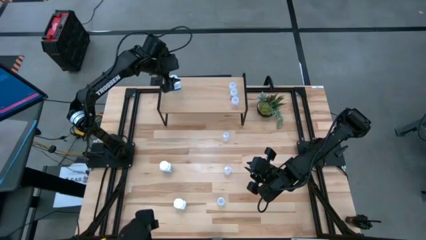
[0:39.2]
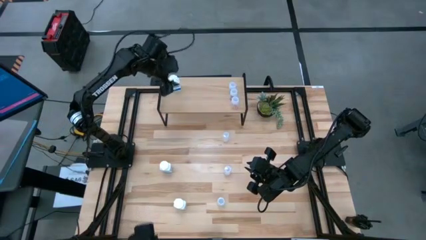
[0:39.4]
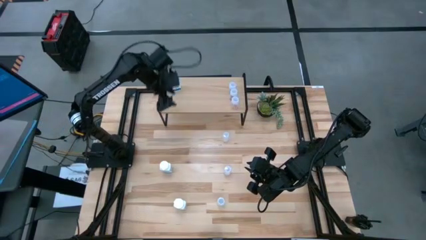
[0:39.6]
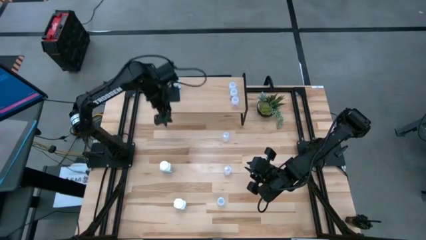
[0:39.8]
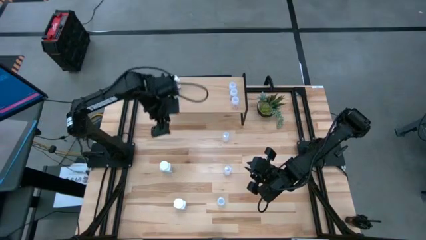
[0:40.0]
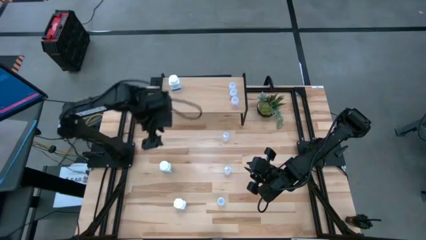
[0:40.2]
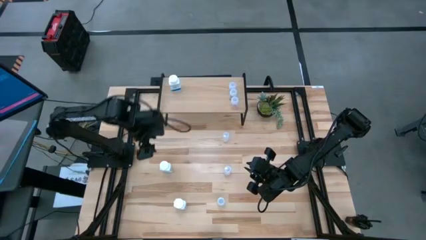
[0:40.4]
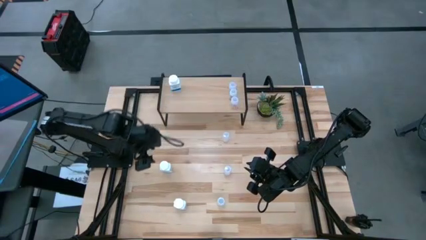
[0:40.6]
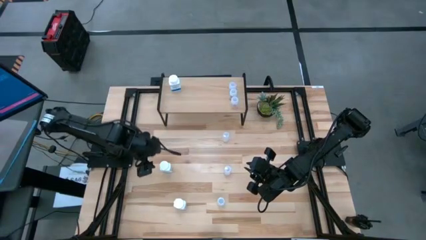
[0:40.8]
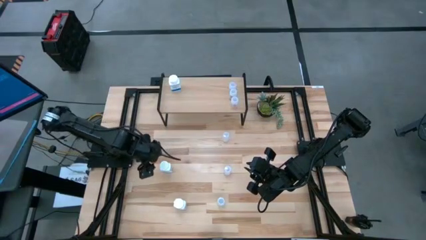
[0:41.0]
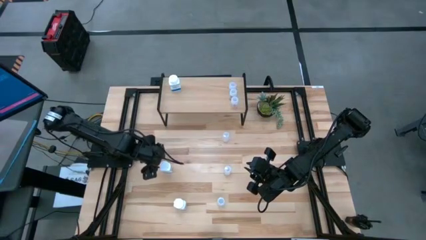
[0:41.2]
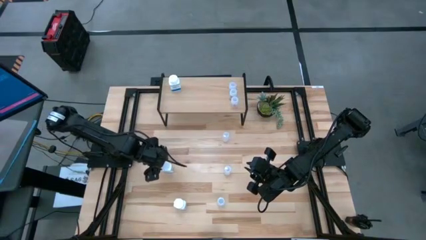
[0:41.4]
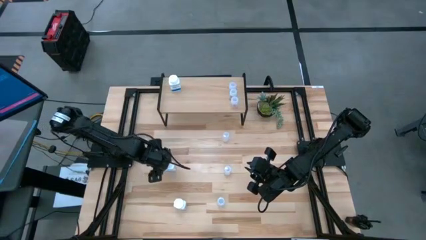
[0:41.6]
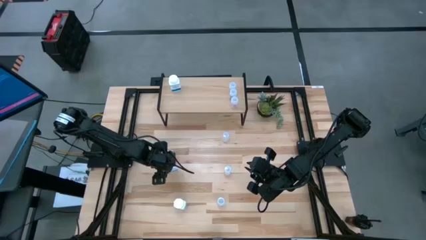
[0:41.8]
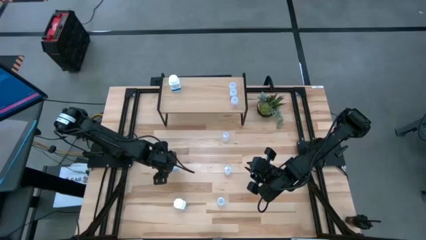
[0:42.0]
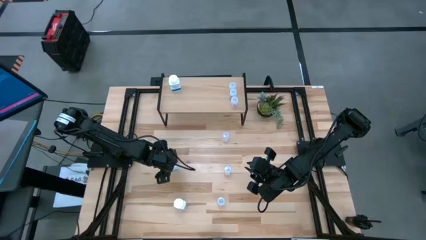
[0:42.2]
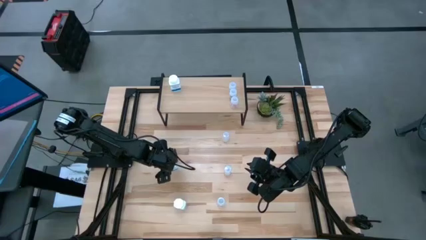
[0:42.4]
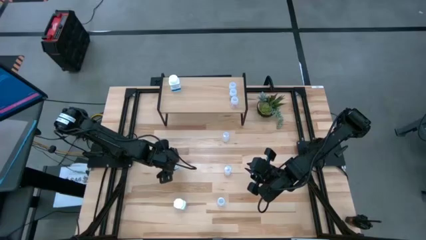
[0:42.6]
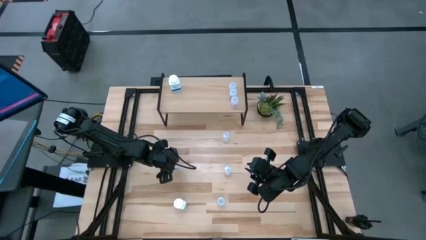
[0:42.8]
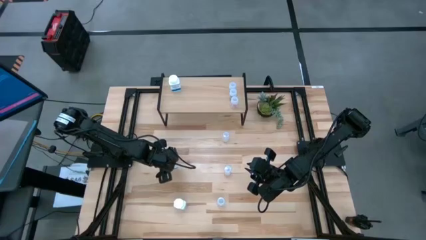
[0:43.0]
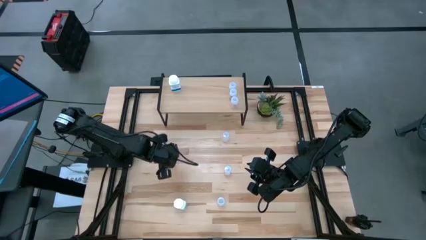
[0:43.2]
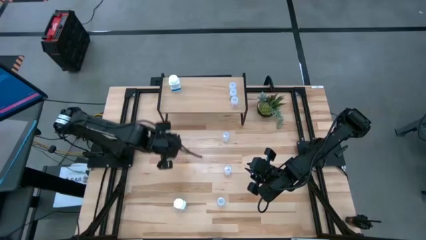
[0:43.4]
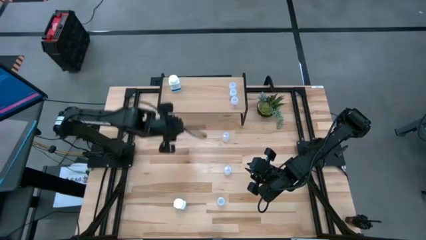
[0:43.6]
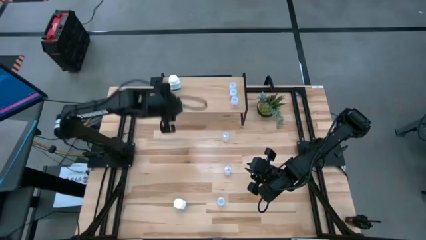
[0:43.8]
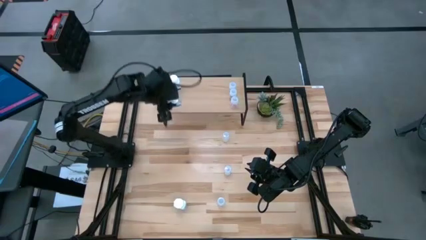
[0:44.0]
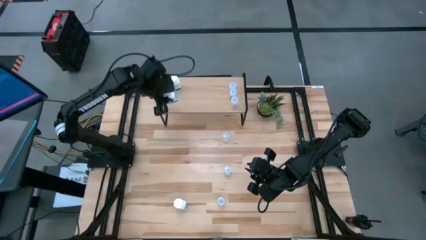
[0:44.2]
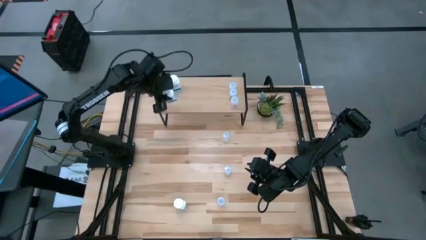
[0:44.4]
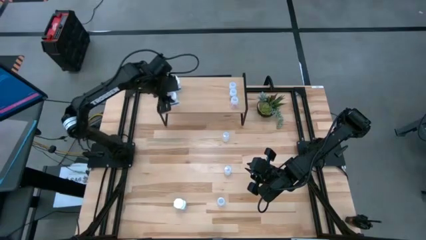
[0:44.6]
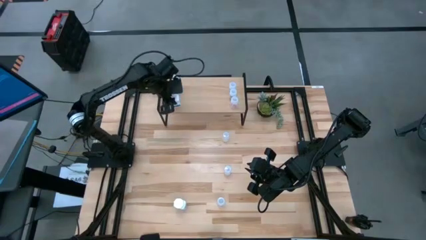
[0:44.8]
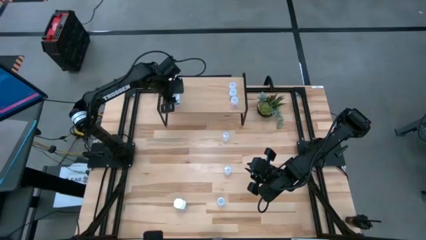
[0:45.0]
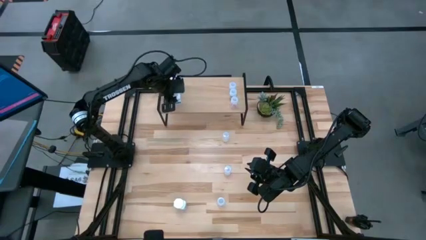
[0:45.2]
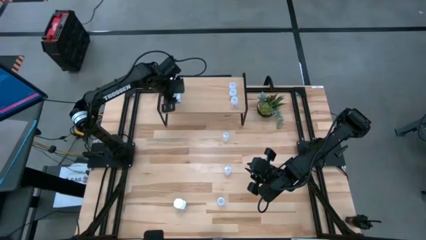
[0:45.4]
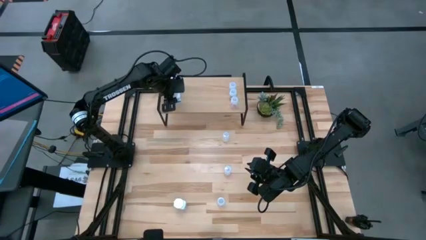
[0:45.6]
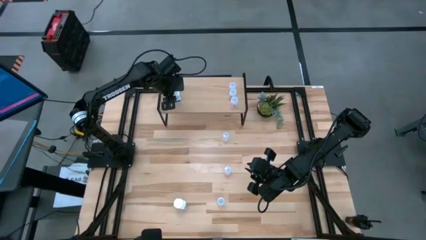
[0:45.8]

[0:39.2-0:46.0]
Task: Pick and place medicine bottles onto shelf by color
Put the white pill bottle on the shelf aligned with the other white pill bottle

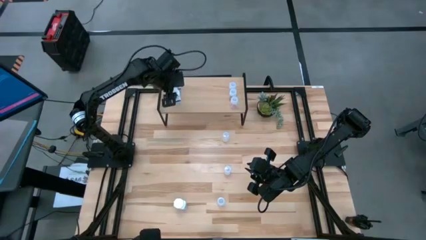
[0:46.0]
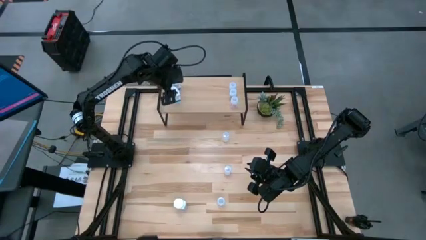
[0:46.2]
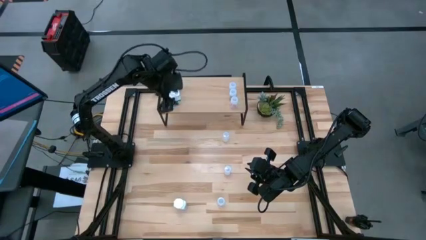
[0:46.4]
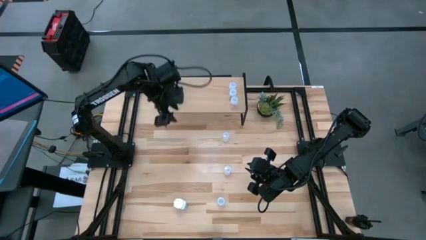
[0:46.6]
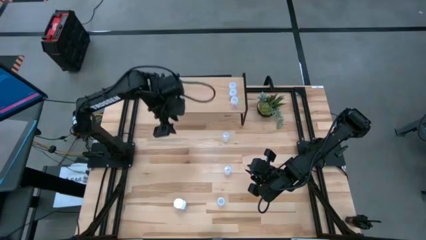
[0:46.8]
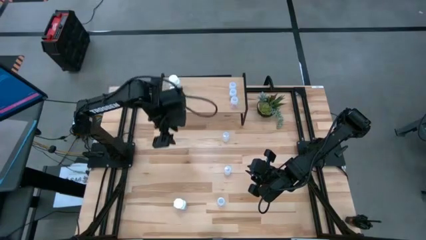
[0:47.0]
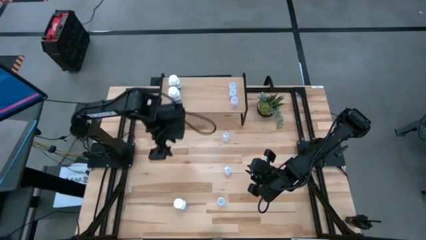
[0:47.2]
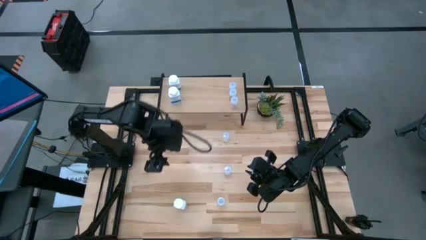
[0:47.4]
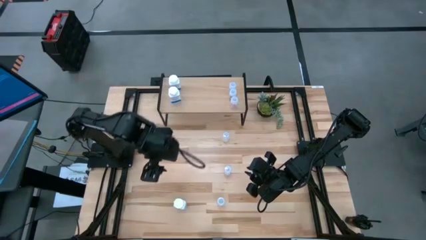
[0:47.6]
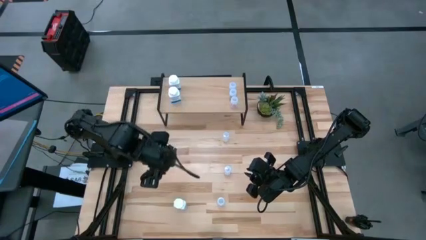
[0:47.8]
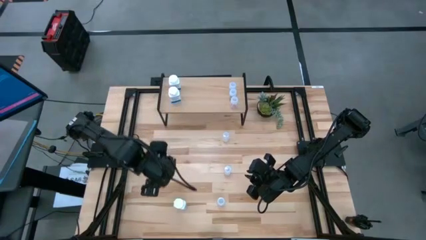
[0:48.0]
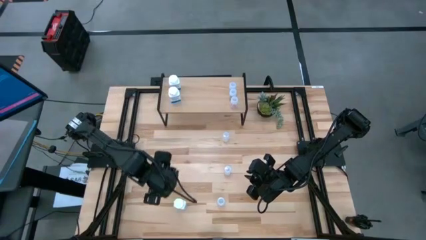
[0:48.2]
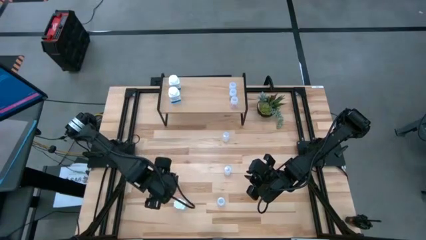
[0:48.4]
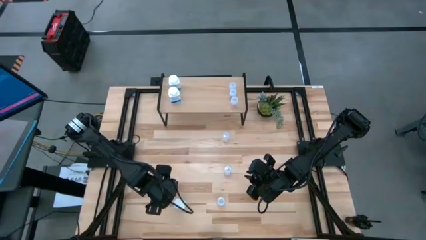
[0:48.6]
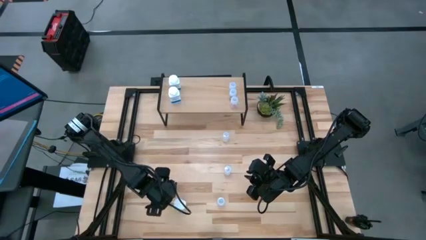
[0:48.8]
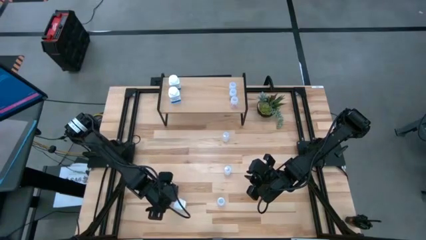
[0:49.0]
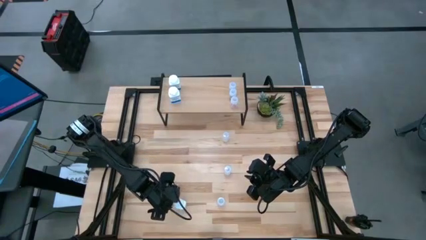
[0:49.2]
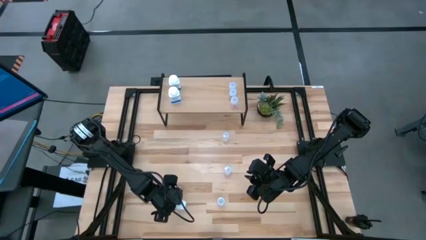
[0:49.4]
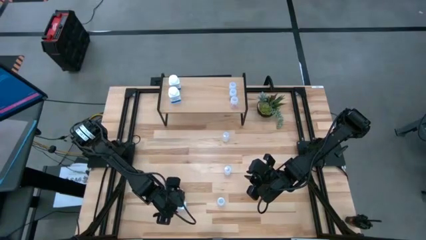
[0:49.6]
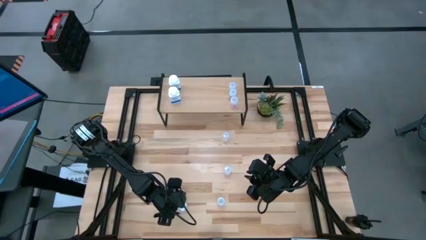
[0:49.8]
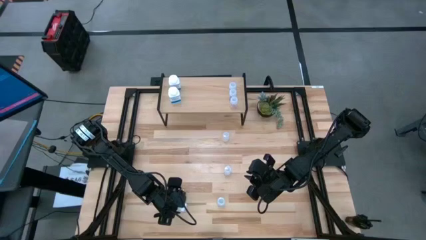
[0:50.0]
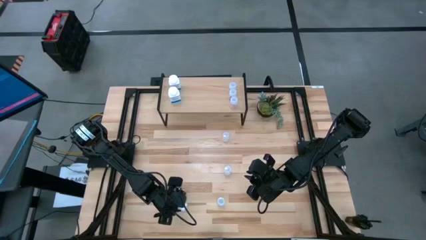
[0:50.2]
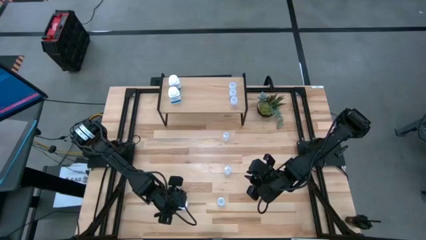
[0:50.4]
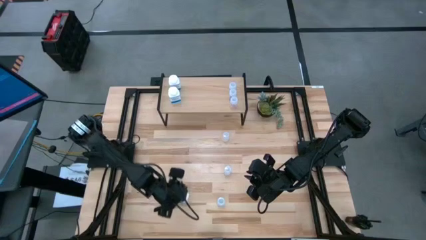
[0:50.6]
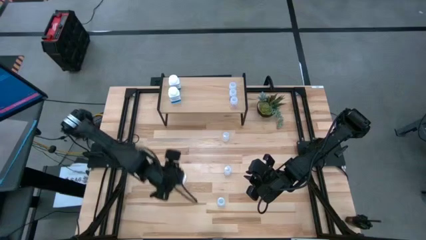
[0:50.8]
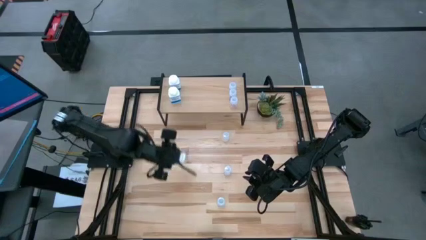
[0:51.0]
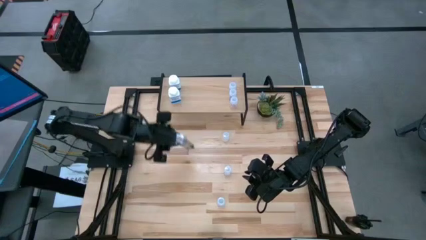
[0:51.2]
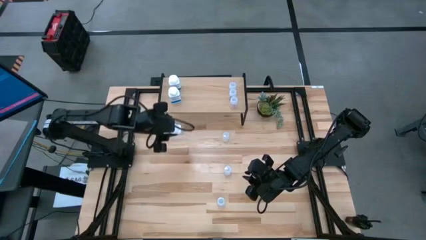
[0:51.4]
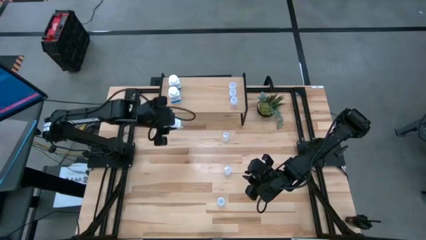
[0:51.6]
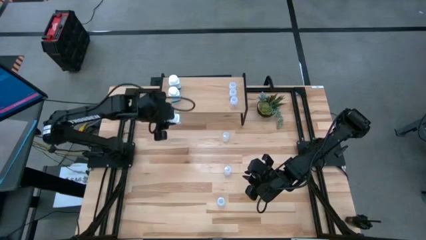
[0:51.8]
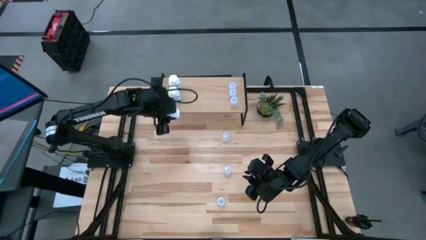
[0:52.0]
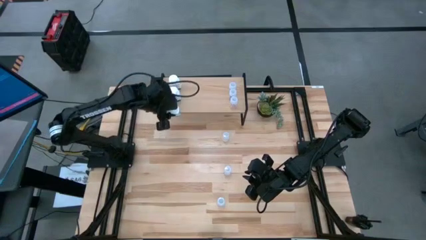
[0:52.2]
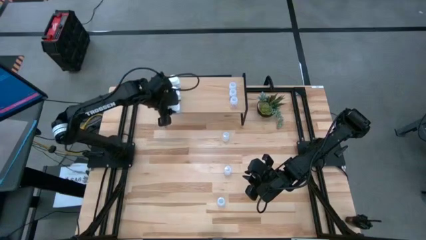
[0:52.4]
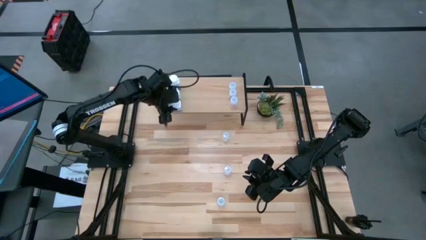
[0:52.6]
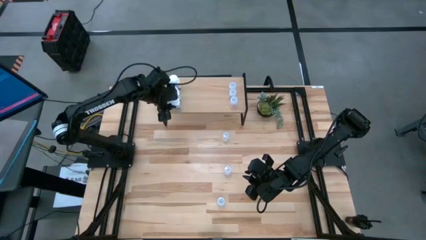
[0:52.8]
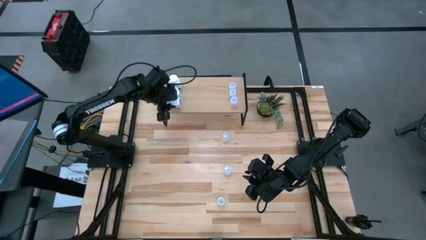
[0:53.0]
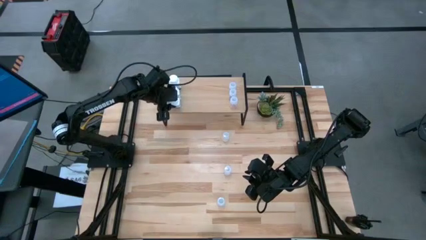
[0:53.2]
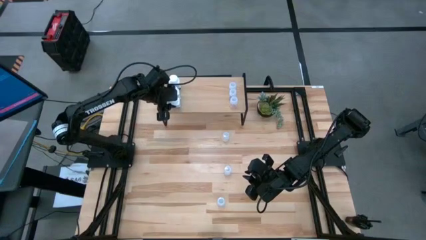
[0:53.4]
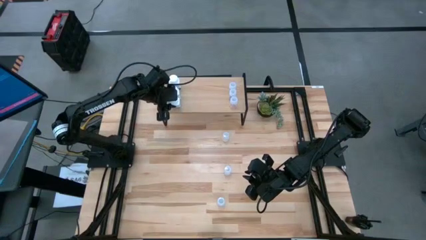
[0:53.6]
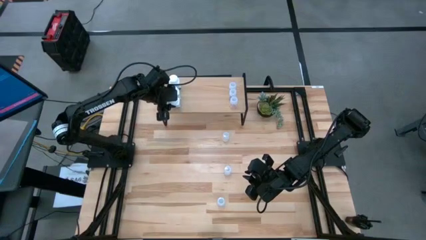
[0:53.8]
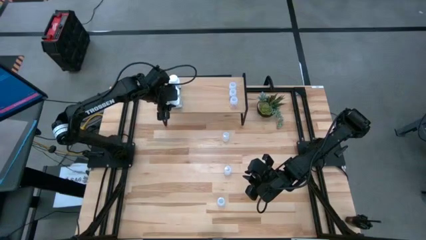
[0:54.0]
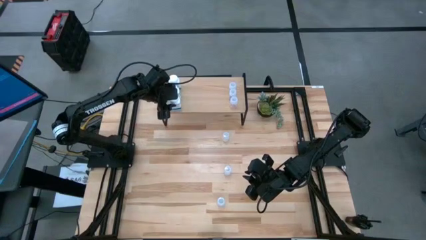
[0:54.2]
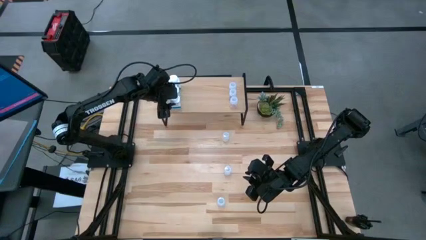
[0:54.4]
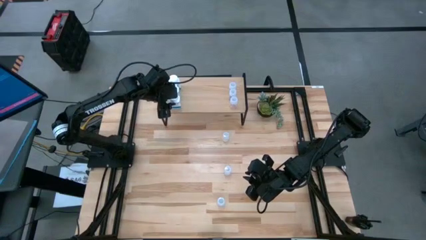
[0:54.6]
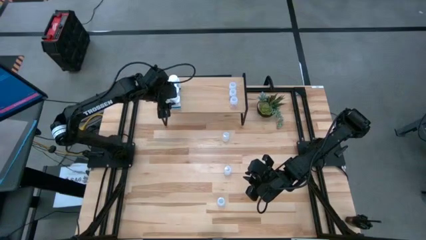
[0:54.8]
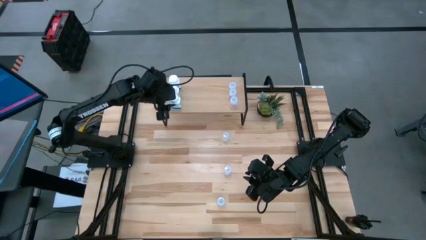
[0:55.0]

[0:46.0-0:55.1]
Put the white pill bottle on the shelf aligned with the other white pill bottles

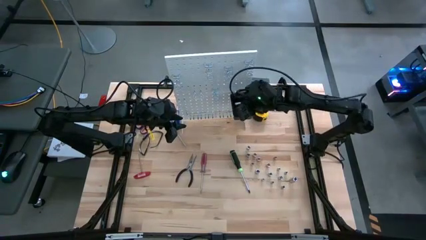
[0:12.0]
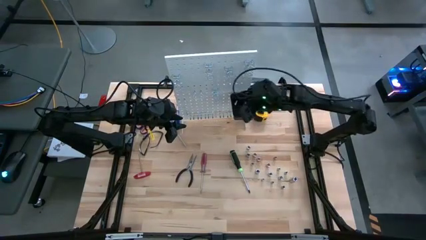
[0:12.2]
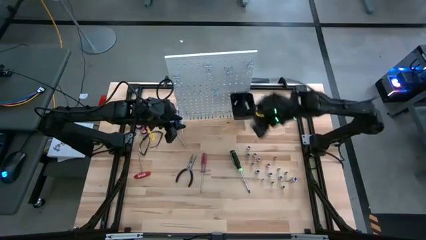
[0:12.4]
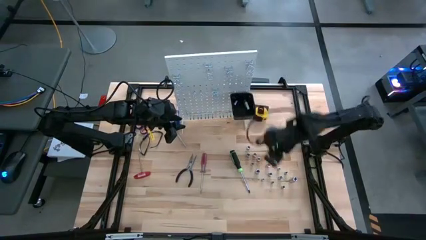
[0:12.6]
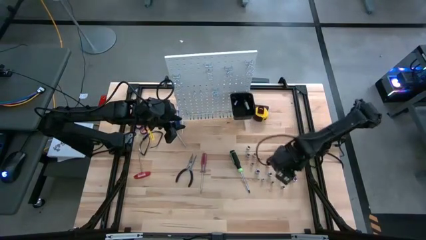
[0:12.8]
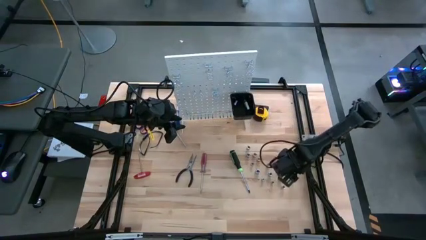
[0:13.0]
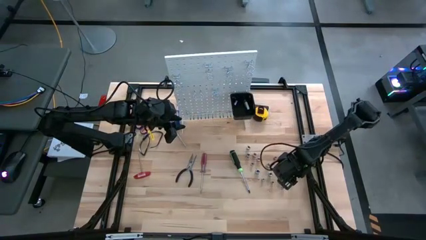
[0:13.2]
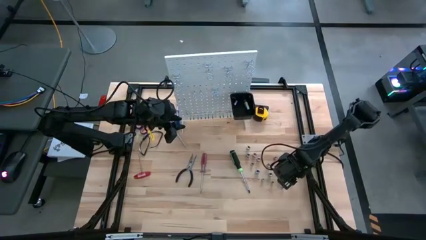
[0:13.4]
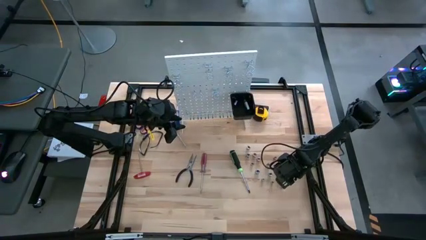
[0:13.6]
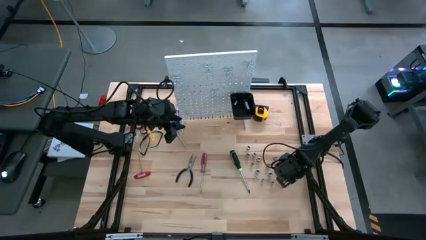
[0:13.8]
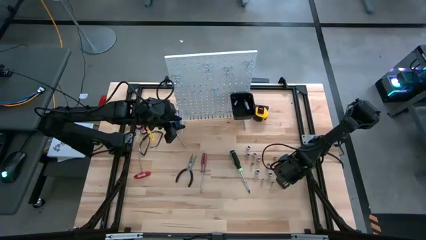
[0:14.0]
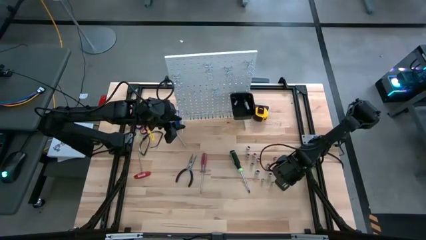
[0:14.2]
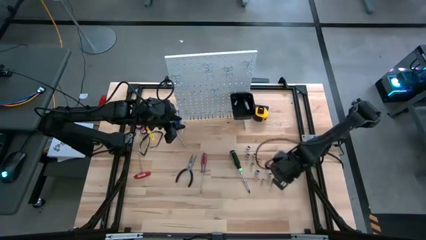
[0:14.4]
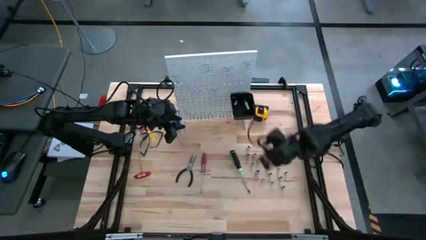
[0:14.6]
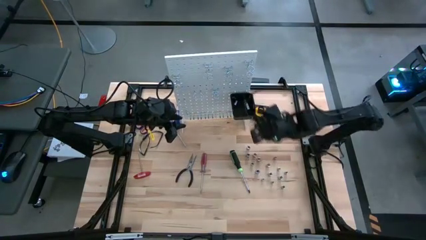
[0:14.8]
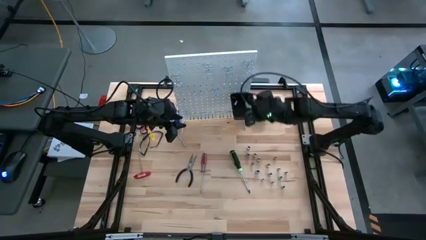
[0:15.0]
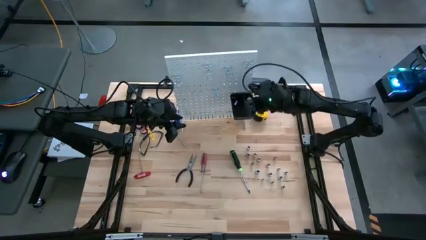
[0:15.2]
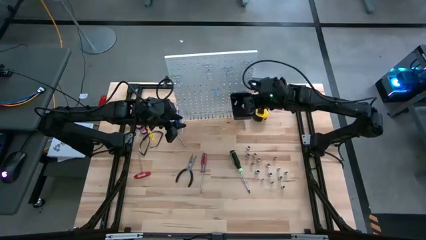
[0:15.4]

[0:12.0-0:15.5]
Task: Hang tools onto peg board
Put the silver extension bar into the black bin on the peg board
